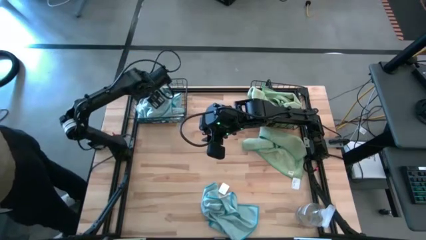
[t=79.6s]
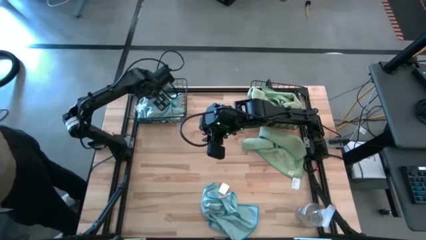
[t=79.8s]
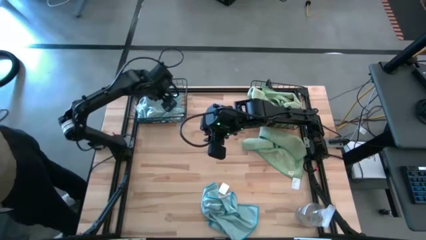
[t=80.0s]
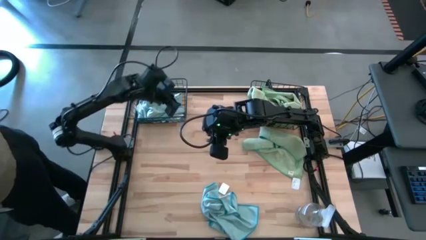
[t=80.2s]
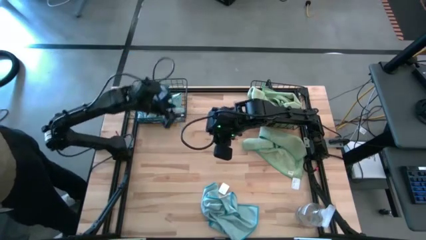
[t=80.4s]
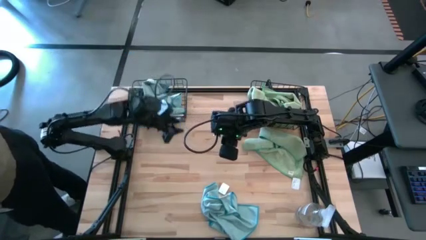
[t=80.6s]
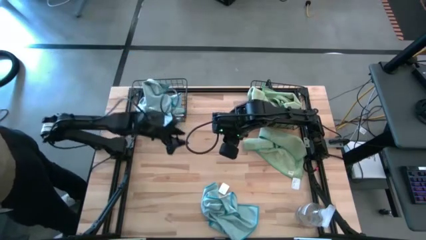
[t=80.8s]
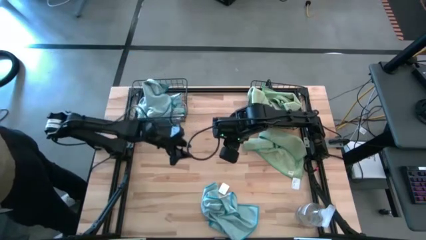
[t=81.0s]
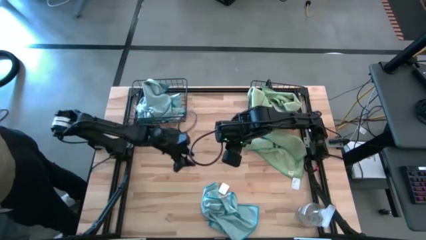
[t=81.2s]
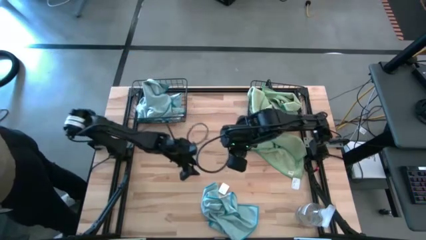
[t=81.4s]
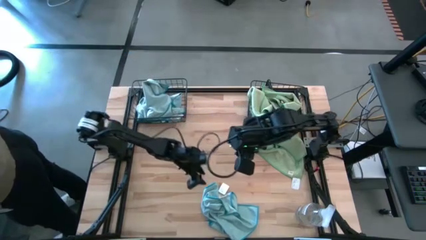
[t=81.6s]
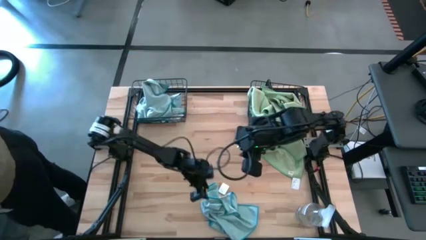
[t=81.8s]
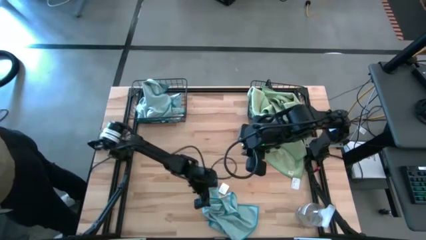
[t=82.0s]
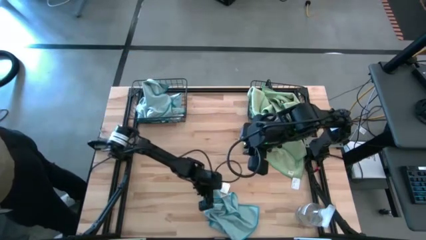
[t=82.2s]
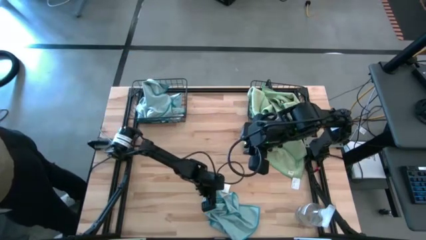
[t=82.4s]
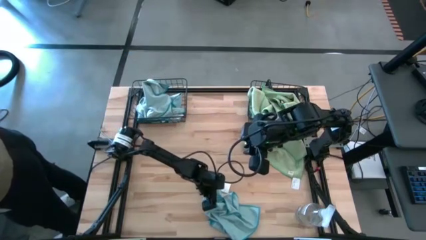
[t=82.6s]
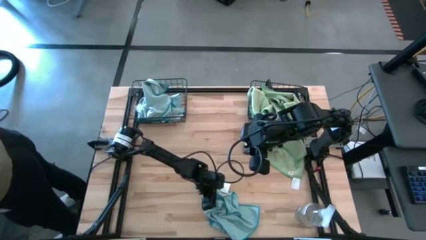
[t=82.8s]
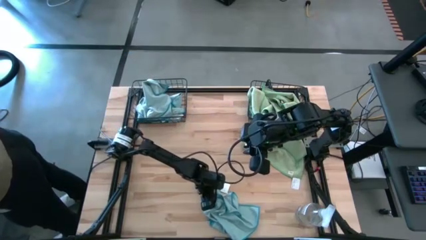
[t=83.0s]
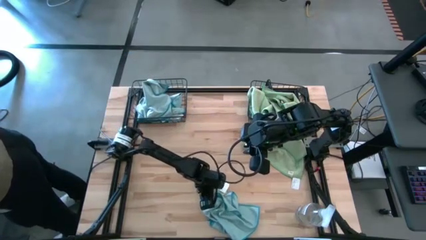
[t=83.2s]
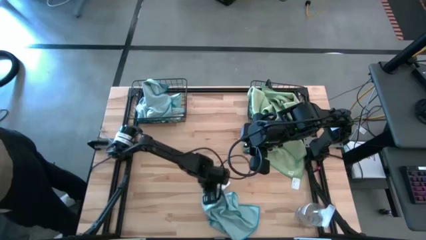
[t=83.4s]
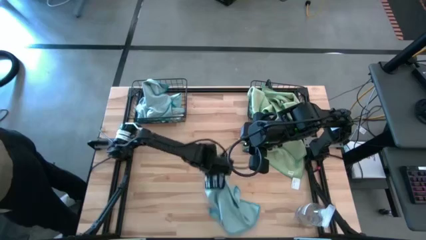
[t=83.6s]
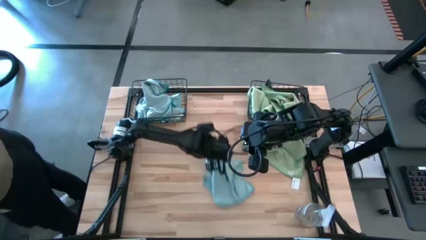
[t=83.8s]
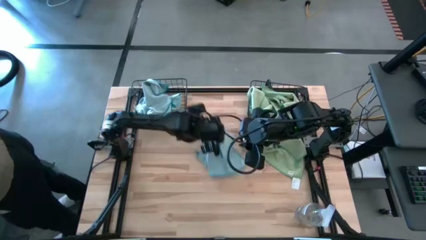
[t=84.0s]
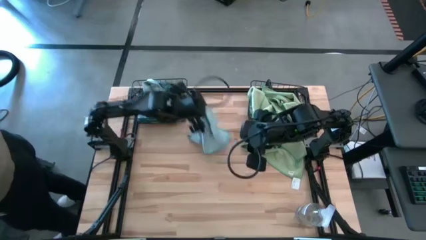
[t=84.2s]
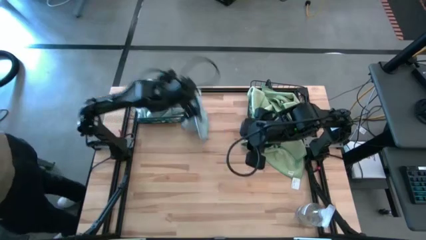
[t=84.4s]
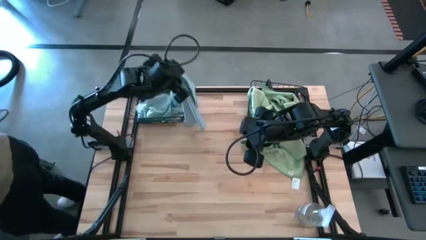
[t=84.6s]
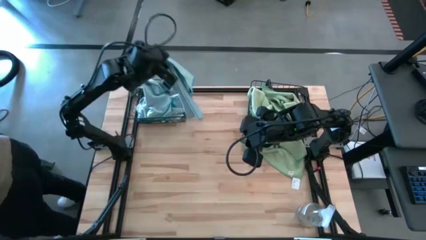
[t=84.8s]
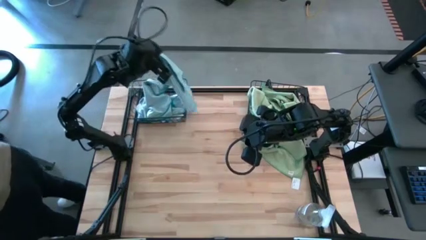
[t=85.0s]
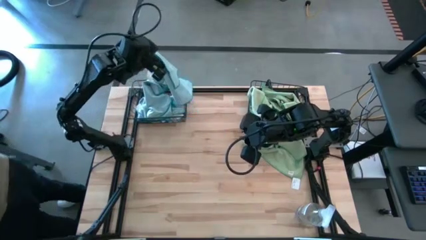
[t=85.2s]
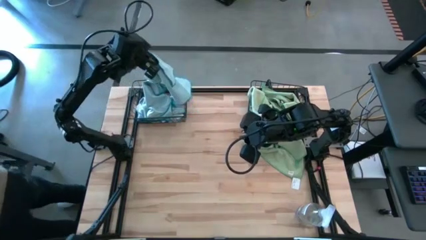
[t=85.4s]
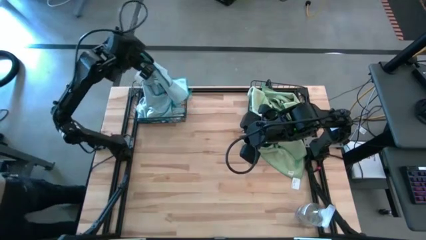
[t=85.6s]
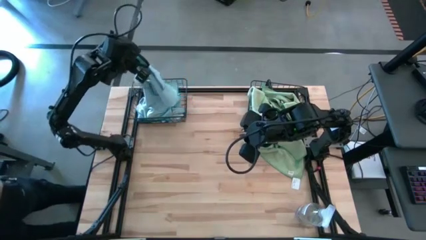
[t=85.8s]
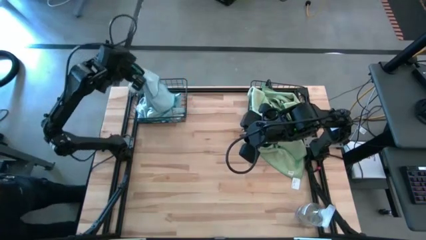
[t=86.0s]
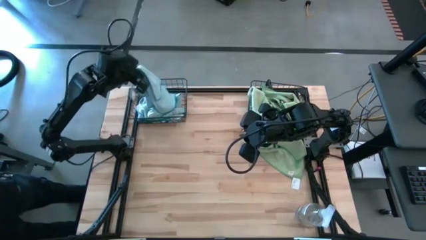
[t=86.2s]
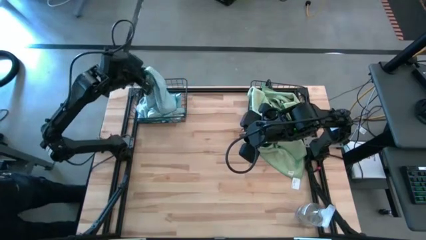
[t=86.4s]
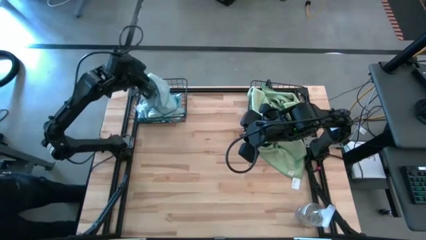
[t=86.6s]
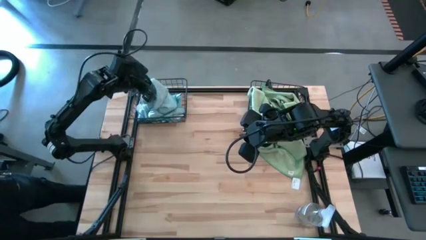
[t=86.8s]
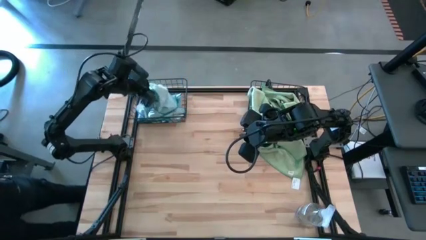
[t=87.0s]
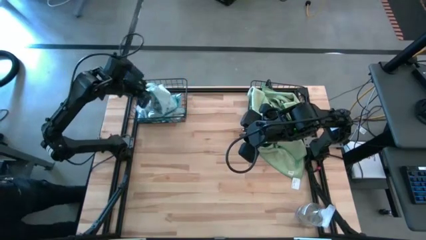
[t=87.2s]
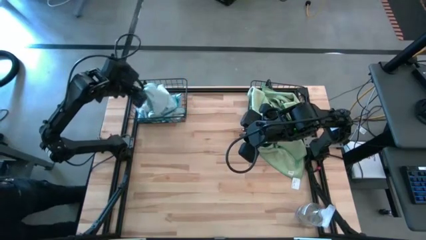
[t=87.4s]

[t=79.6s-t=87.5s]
Task: Sort microfiber towel by color & place in baskets
Put the blue microfiber towel into the left wire basket

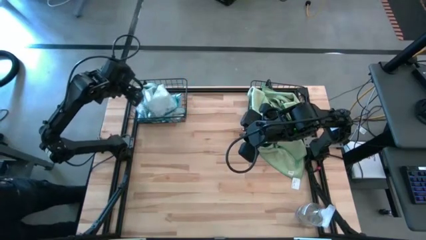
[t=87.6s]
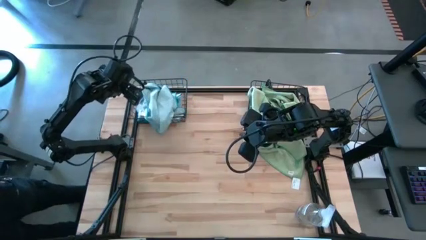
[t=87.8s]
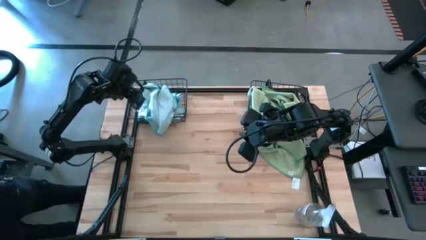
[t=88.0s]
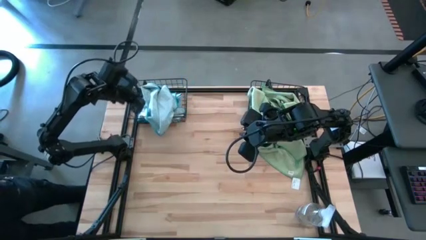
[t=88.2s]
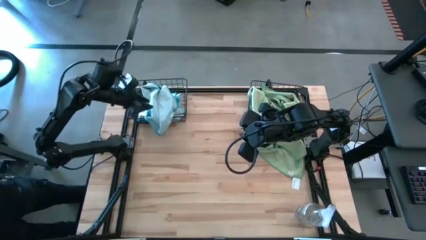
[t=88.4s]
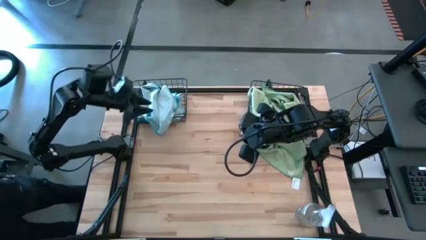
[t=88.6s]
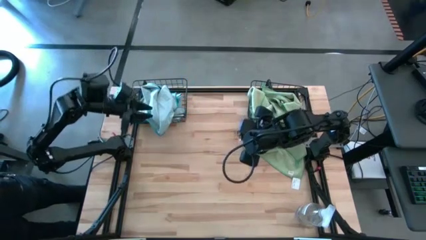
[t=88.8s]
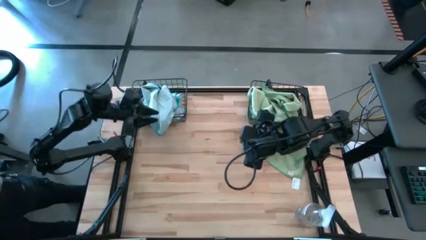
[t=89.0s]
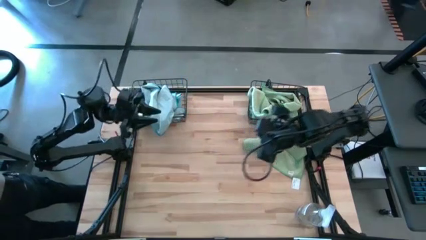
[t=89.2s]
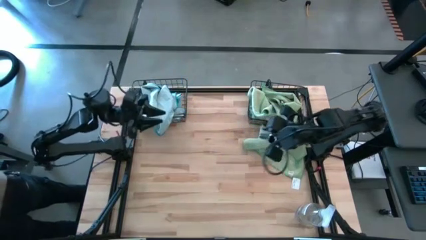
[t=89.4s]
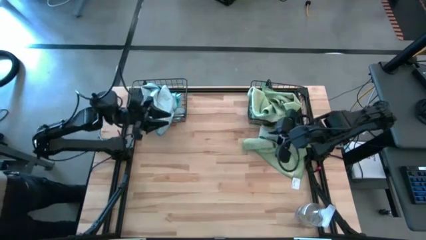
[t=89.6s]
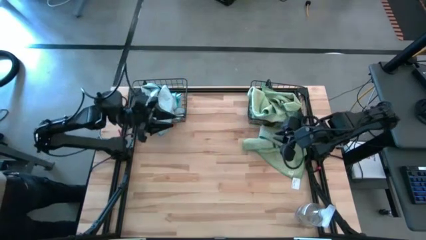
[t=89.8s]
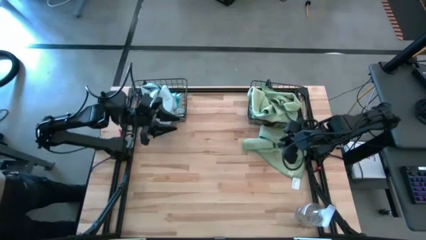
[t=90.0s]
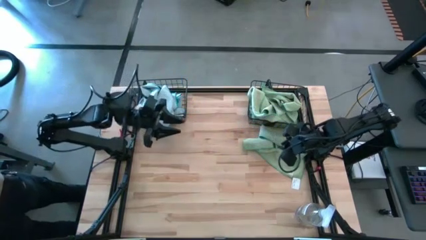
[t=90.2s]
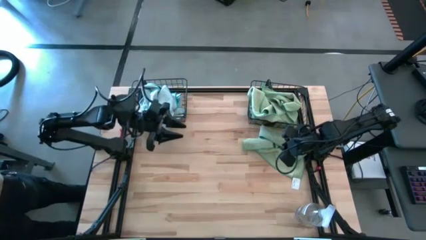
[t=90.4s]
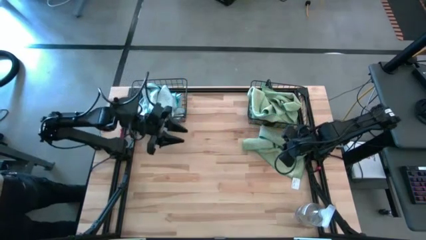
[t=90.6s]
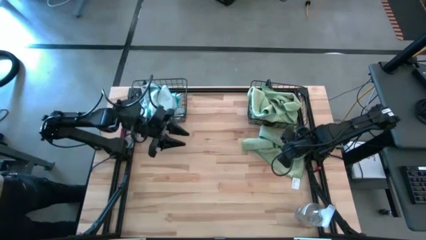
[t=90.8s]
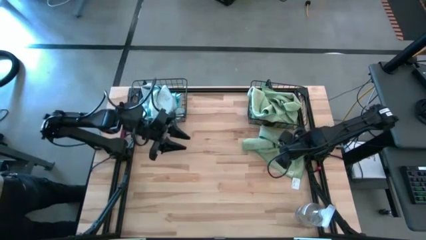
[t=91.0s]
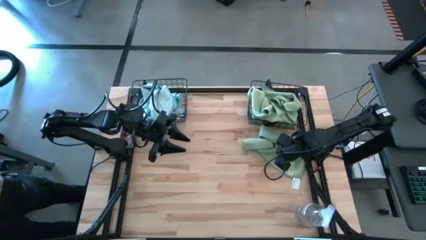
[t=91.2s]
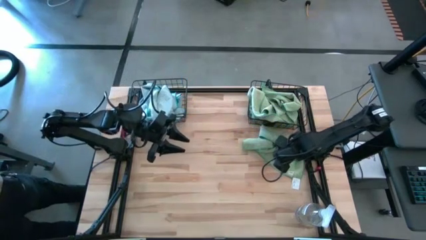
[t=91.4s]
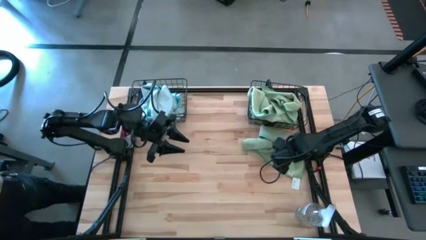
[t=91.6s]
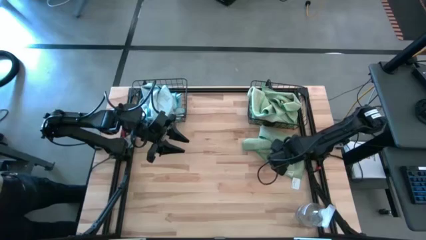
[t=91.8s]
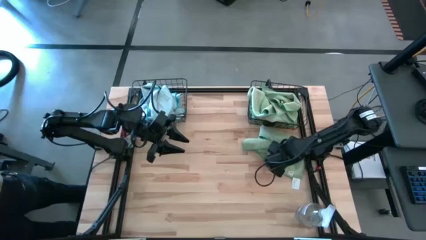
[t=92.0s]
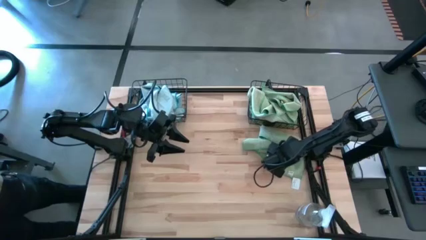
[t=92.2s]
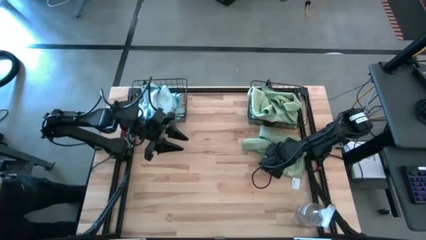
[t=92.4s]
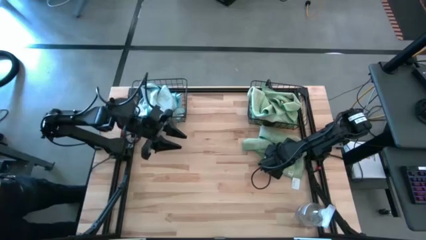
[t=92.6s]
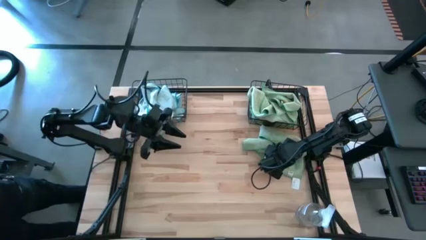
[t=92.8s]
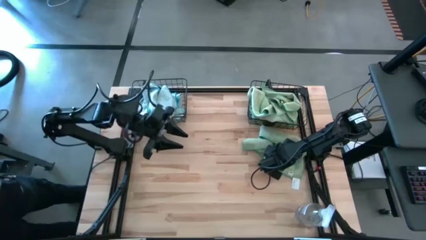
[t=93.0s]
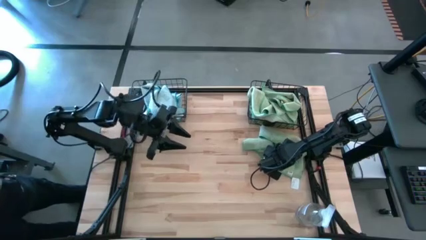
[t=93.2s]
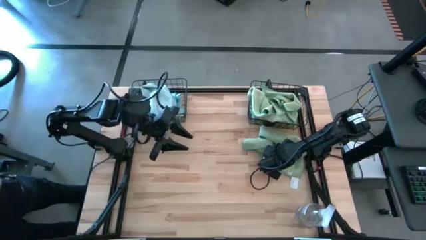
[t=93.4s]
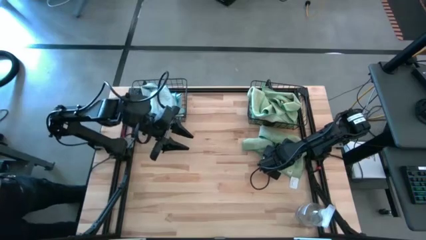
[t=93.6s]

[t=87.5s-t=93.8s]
Put the green microfiber towel into the right wire basket
